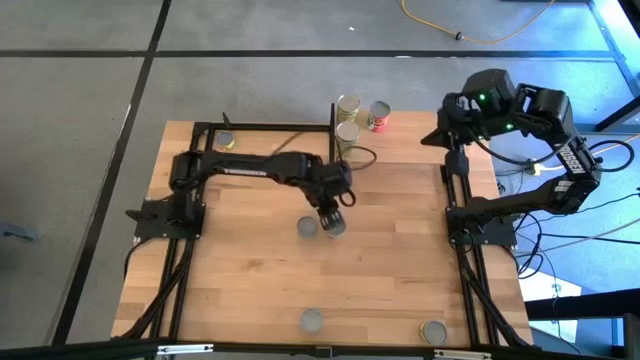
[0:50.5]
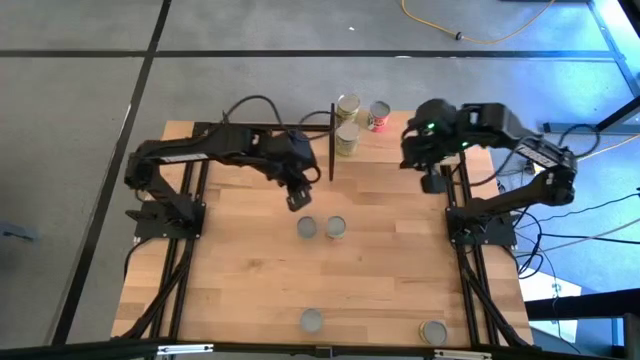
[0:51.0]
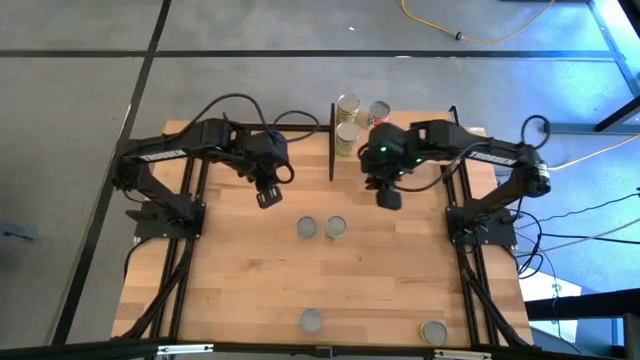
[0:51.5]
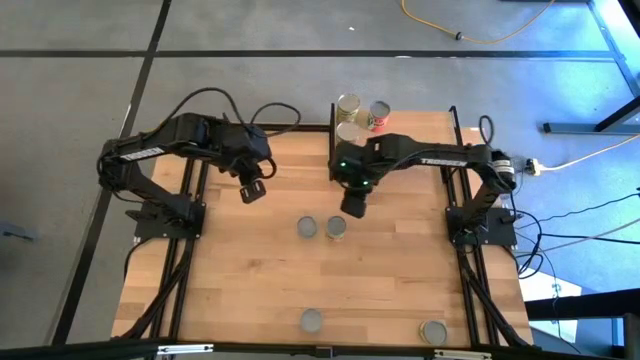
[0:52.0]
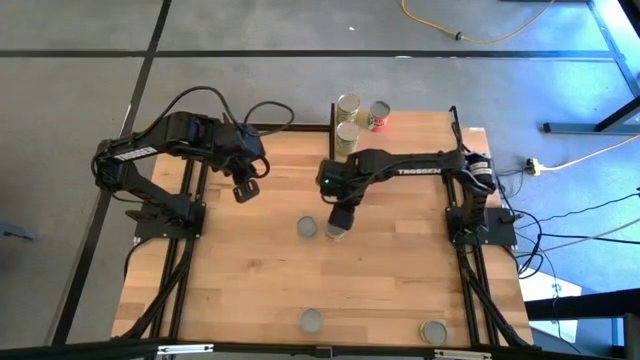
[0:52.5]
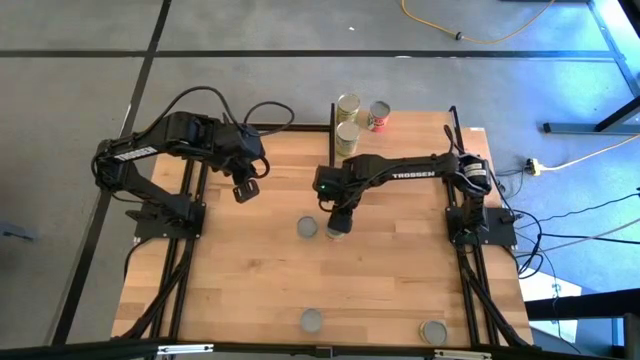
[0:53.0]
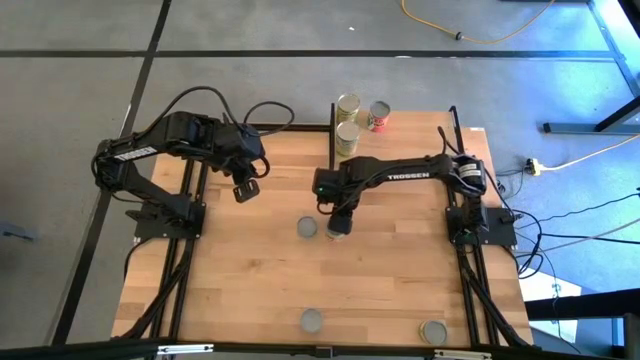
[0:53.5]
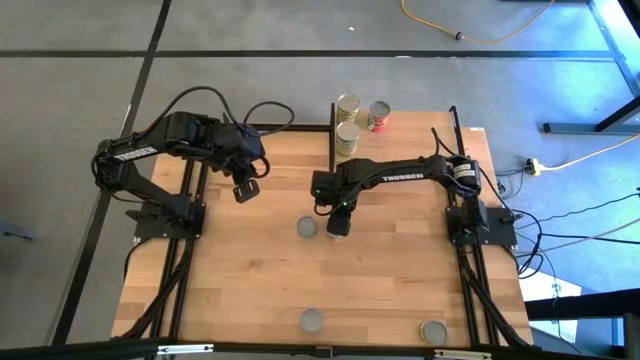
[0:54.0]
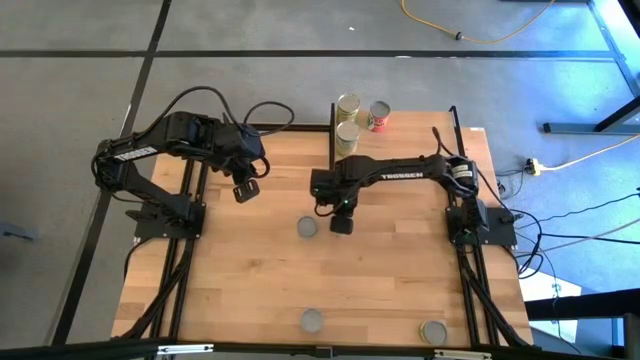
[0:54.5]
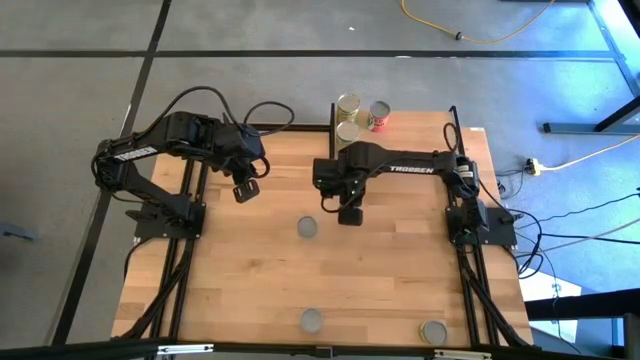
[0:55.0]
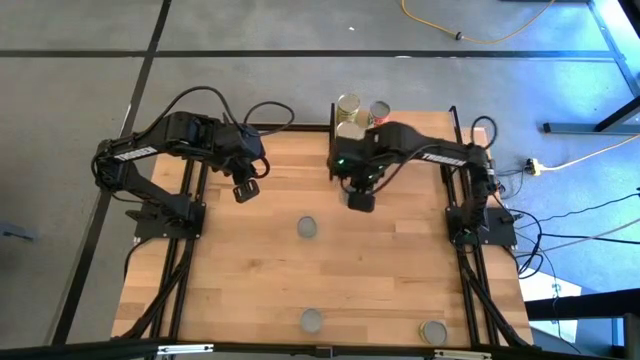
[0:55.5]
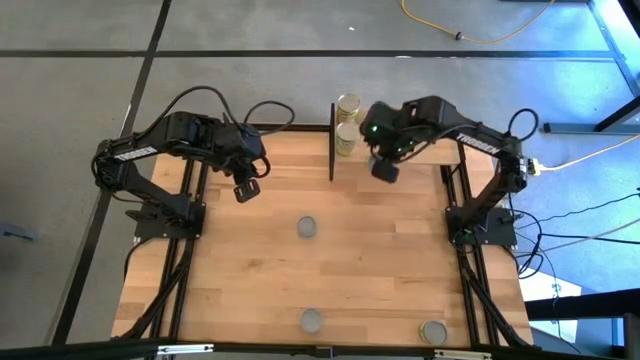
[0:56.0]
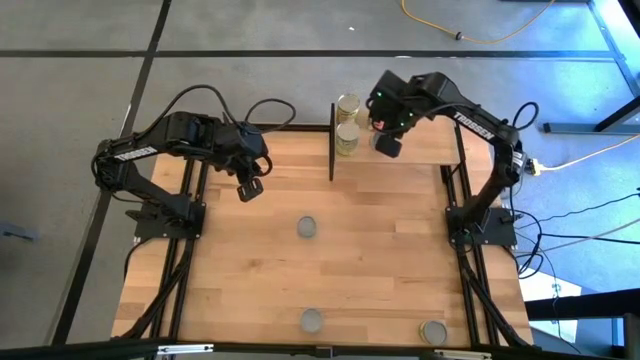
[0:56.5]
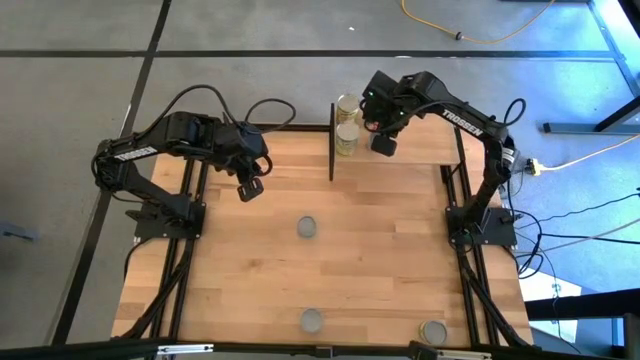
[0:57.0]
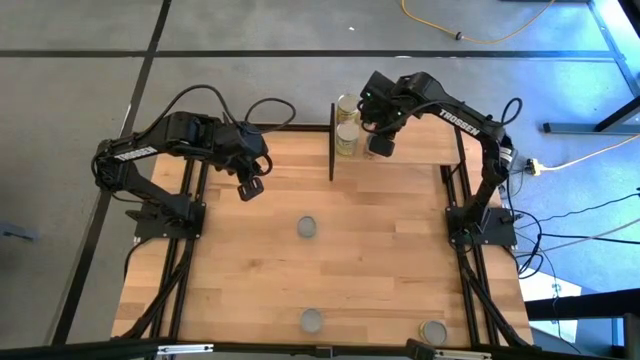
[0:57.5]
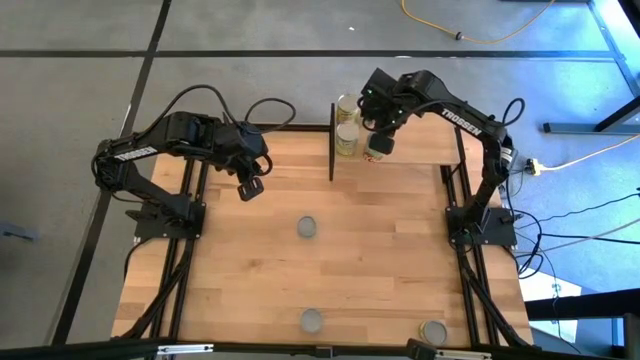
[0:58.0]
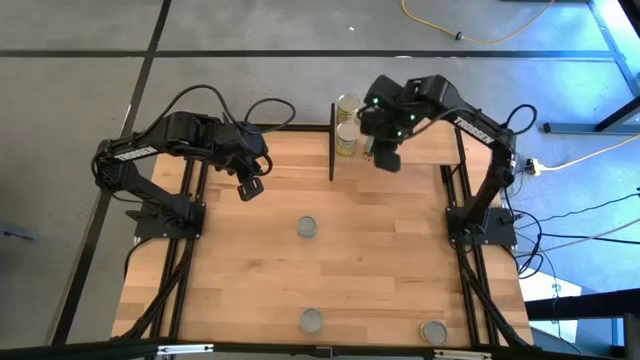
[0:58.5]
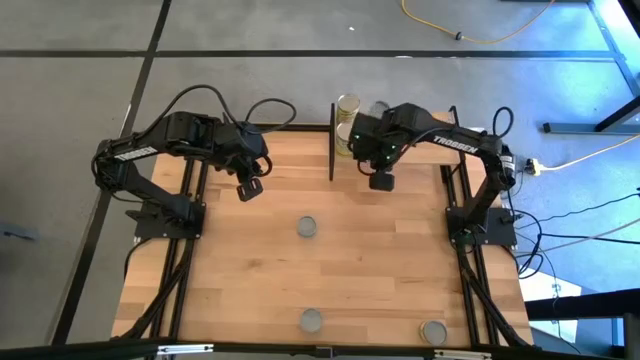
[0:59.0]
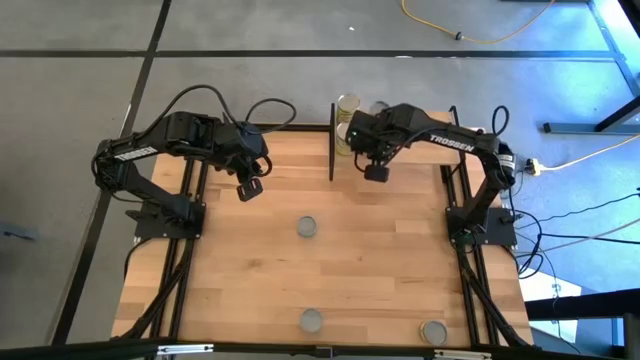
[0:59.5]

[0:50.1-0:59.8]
Task: Pick and place cans onto a shelf
Put the green and red can on the shelf

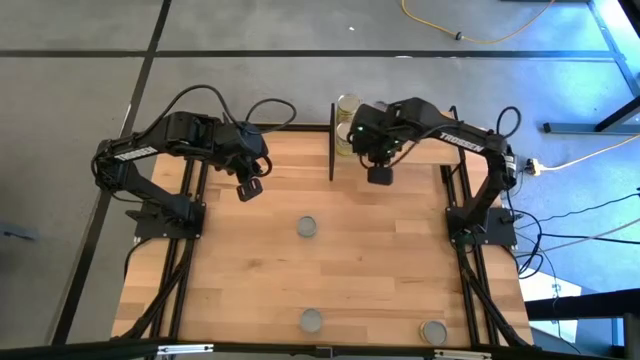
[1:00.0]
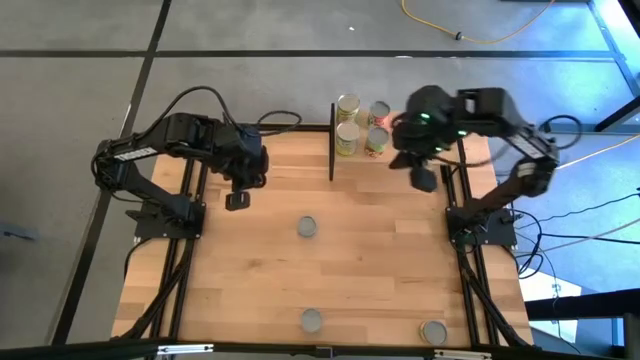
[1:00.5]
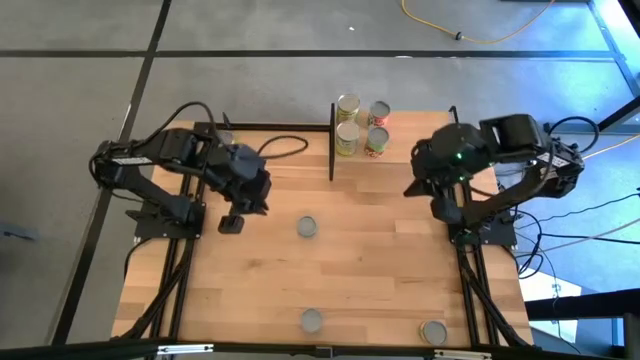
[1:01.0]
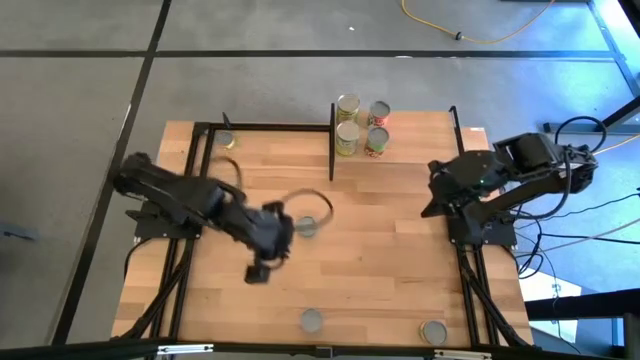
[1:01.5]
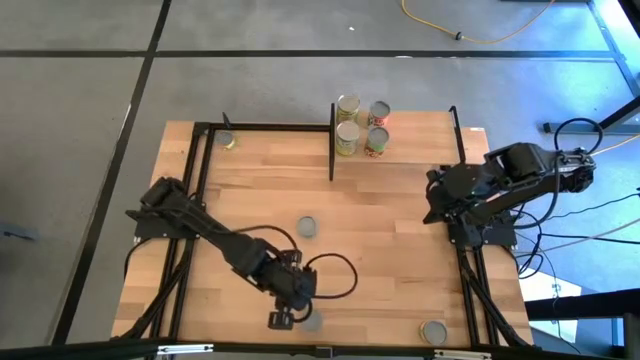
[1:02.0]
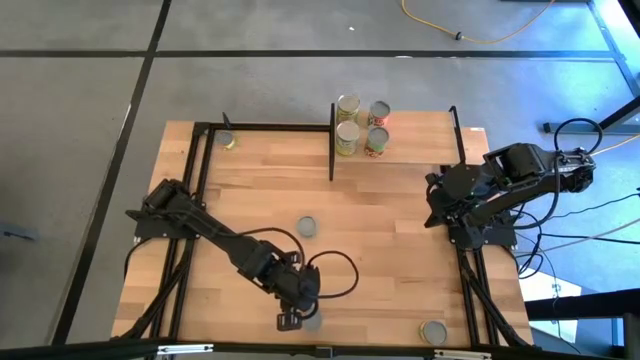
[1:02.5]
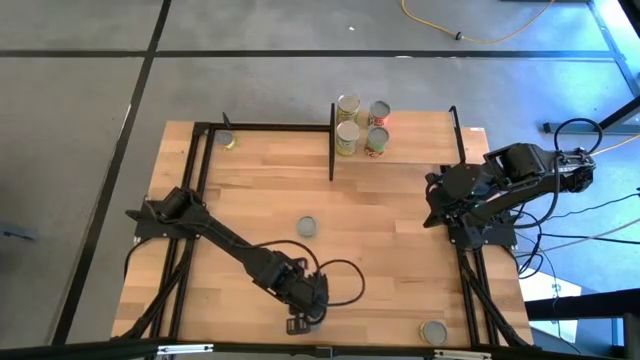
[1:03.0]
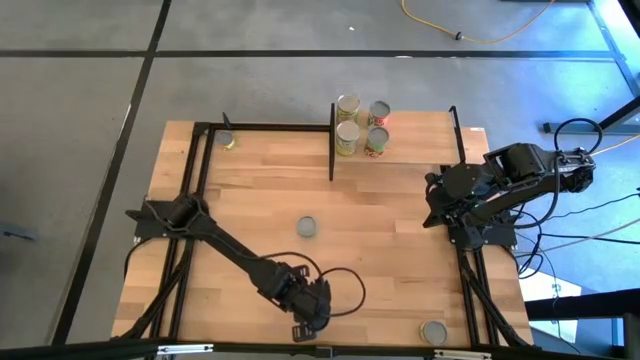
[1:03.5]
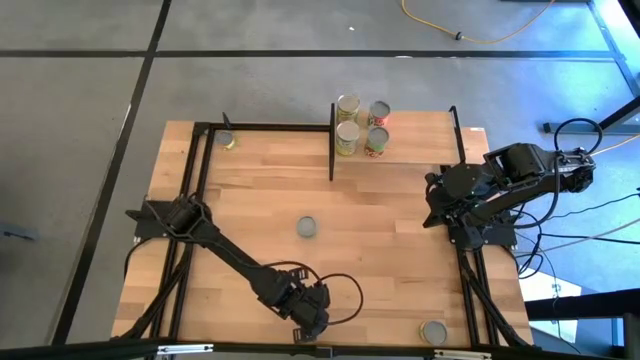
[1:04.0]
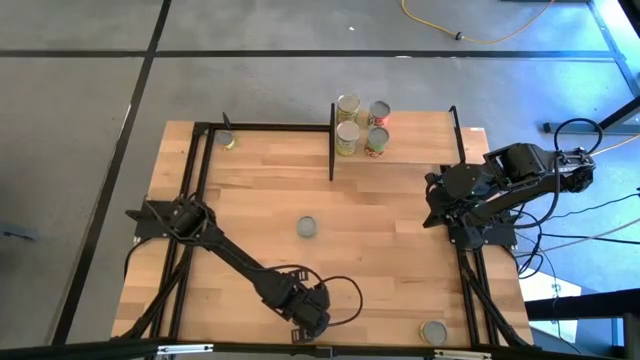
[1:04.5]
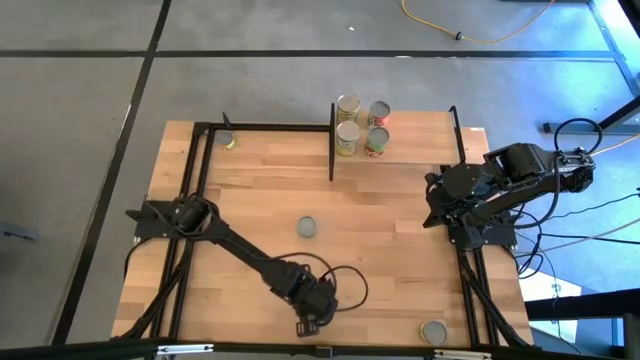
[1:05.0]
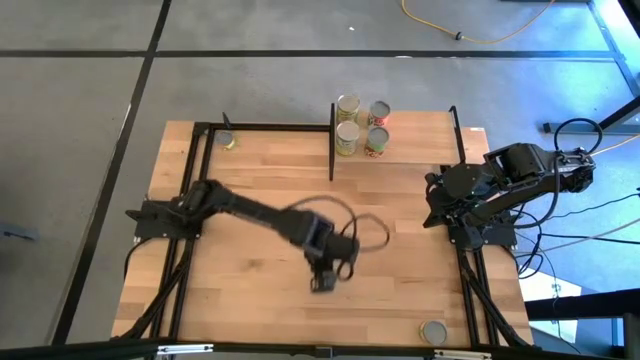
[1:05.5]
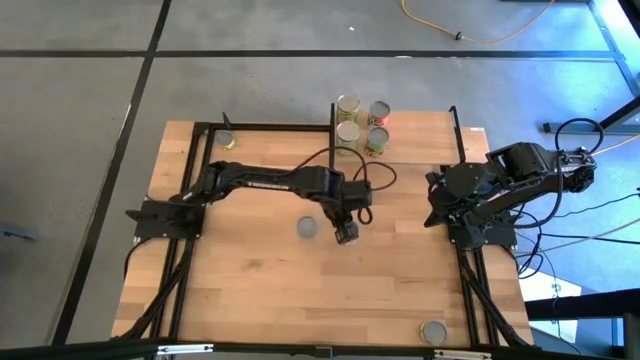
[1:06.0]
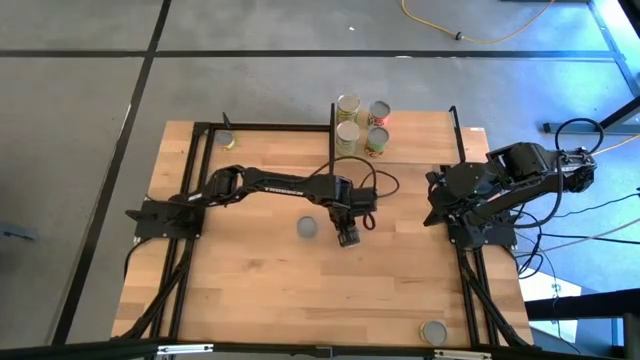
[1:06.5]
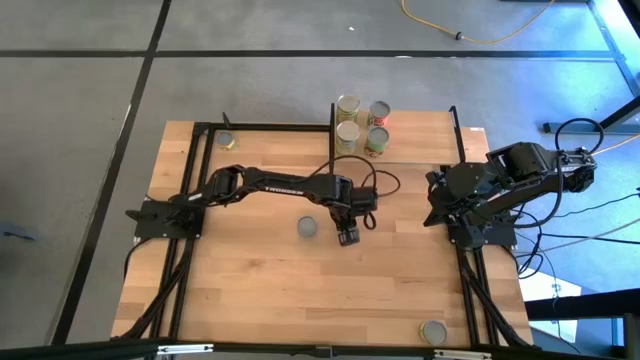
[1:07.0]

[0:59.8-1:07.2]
Move the white and orange can to the middle of the table

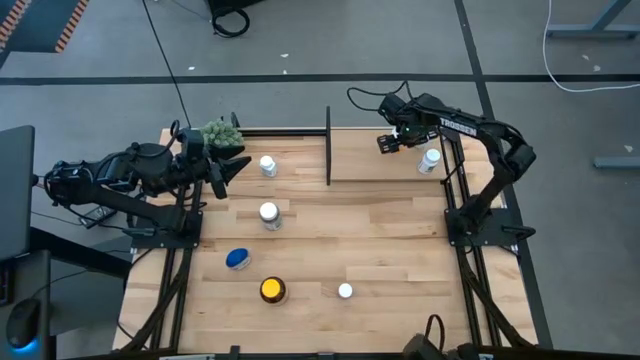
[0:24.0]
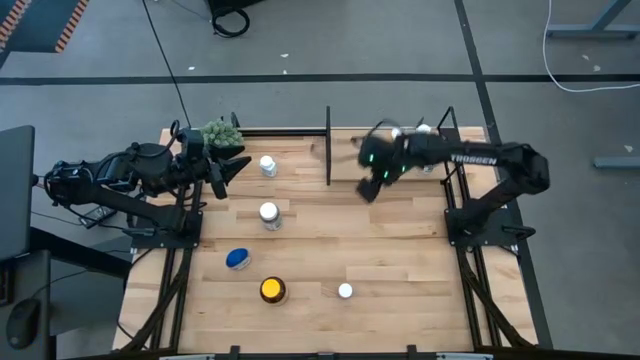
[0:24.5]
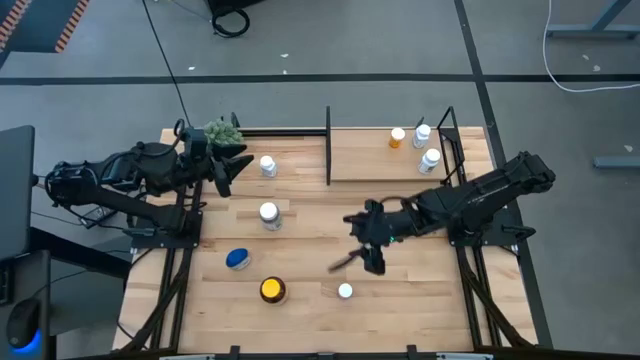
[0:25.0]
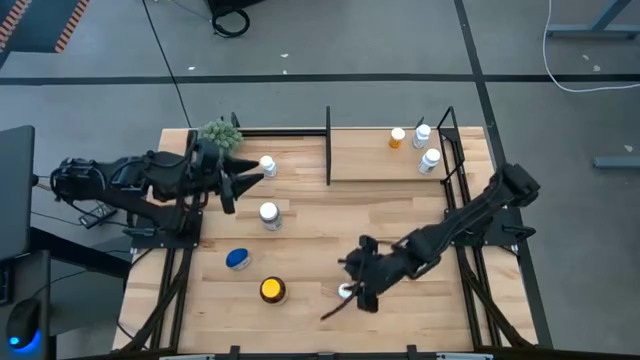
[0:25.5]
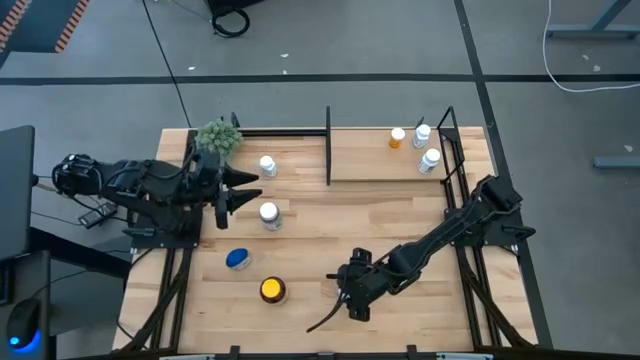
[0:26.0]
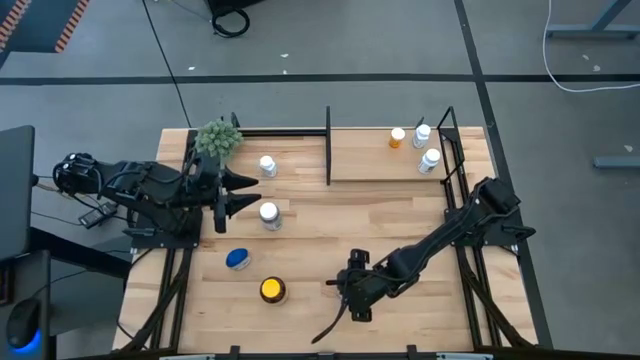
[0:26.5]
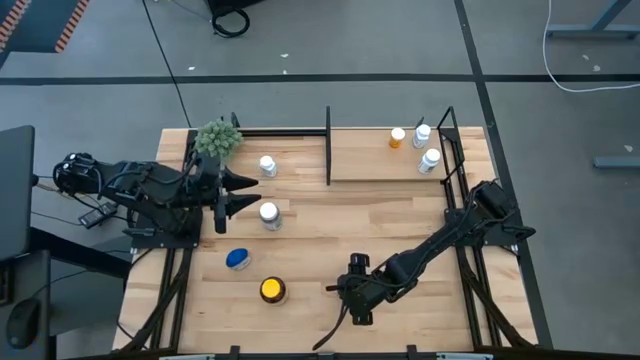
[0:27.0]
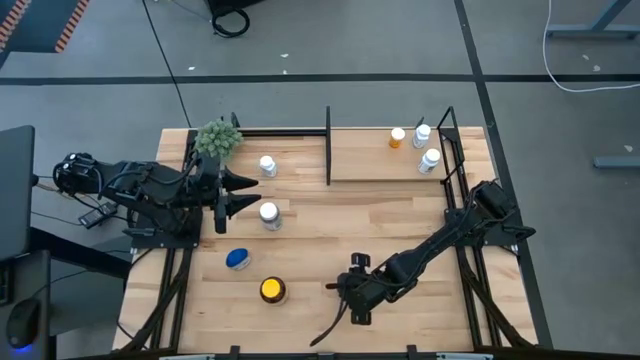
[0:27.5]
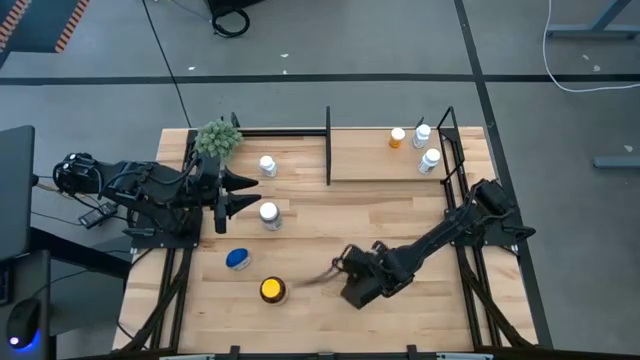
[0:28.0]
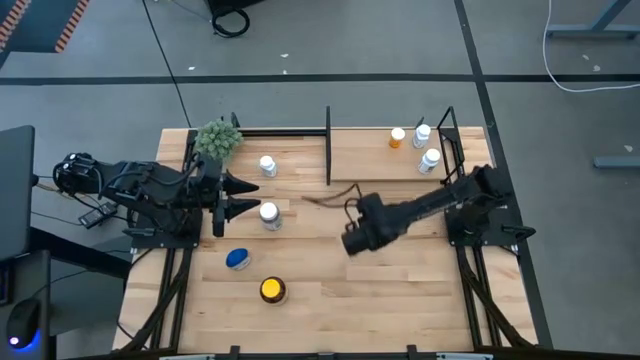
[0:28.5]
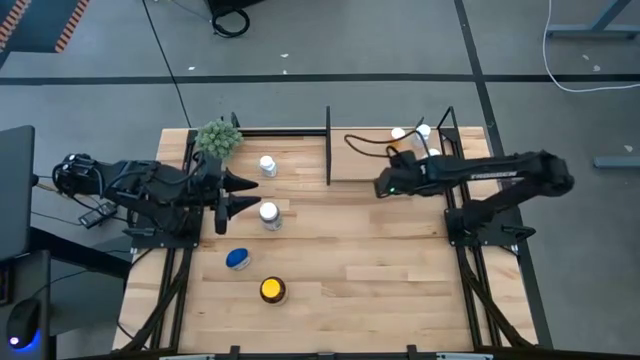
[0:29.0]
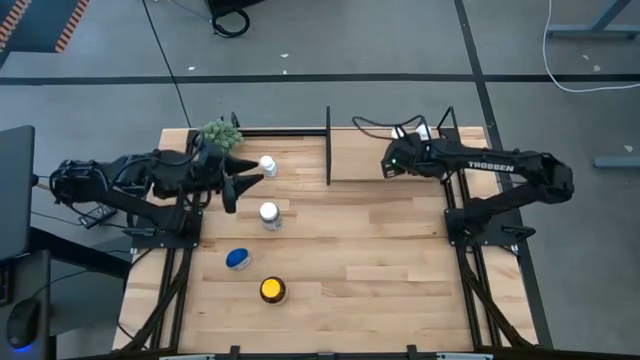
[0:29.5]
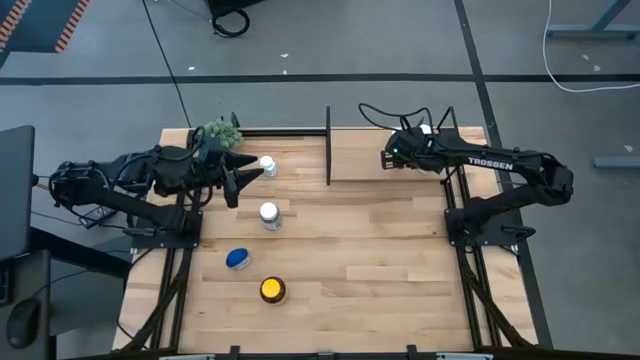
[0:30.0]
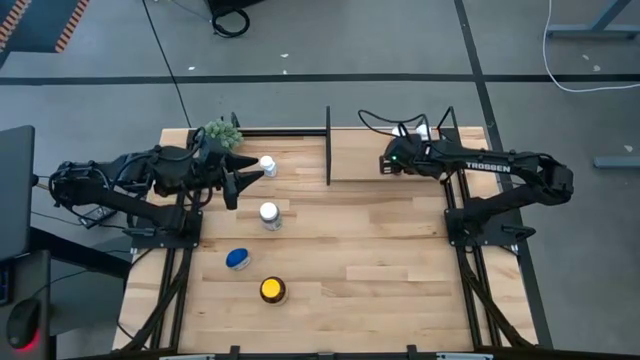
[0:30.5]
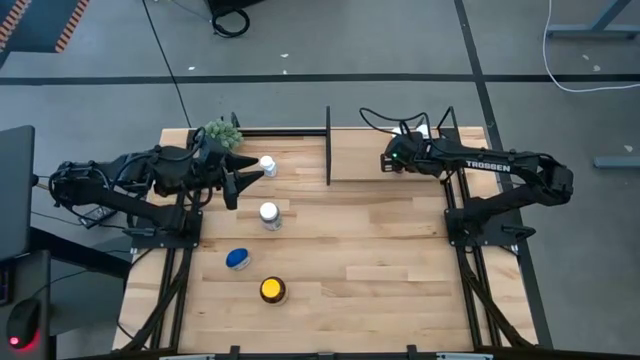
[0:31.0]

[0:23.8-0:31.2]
Task: Pick and place medicine bottles onto shelf by color
Put the pink pill bottle on the shelf
